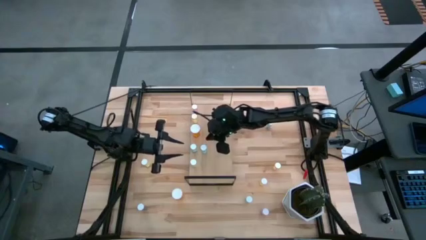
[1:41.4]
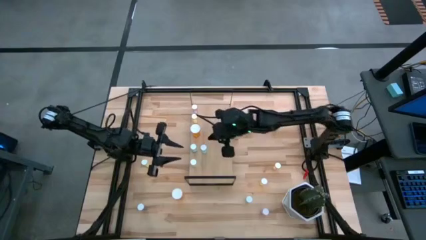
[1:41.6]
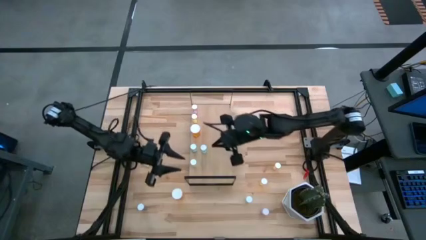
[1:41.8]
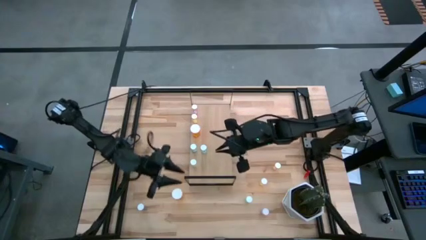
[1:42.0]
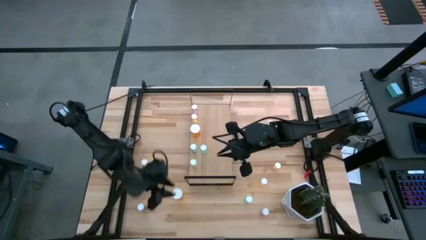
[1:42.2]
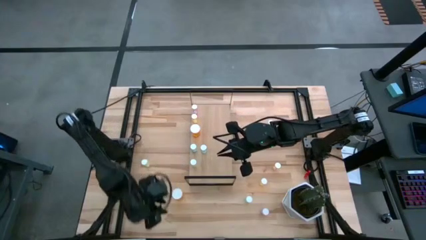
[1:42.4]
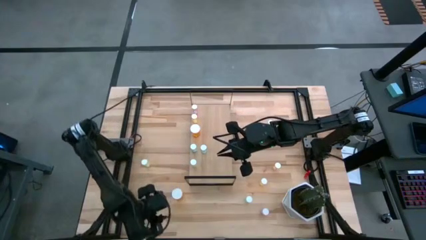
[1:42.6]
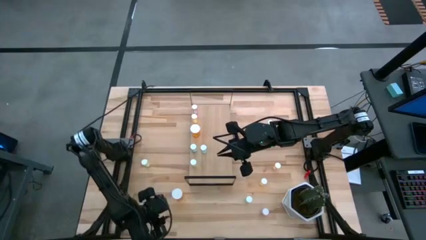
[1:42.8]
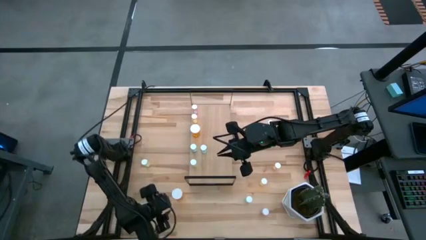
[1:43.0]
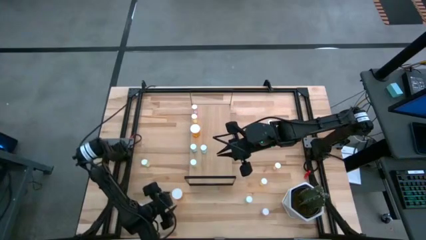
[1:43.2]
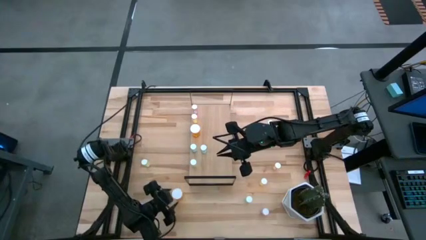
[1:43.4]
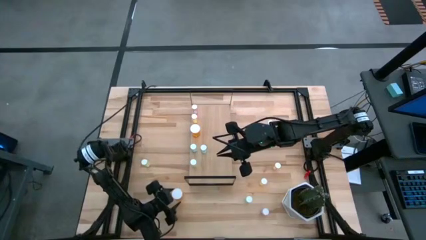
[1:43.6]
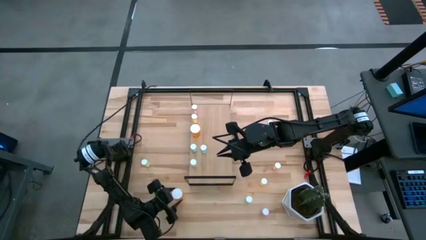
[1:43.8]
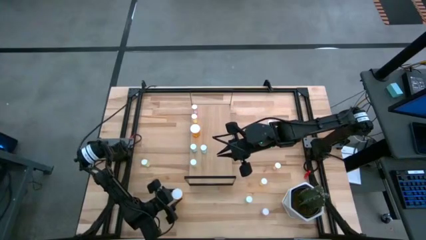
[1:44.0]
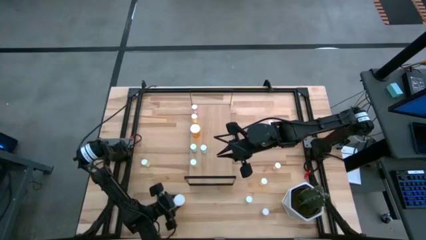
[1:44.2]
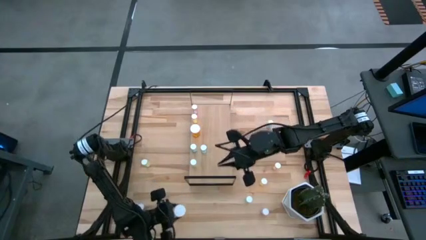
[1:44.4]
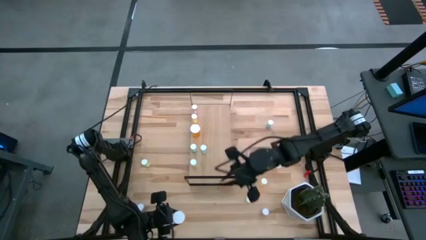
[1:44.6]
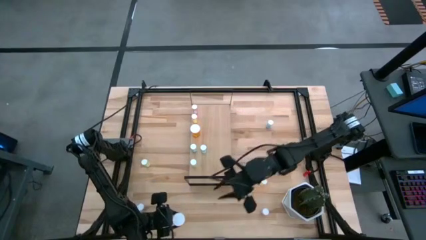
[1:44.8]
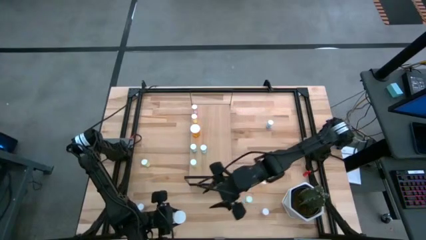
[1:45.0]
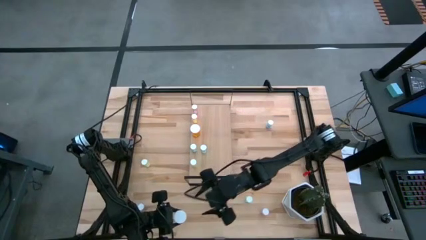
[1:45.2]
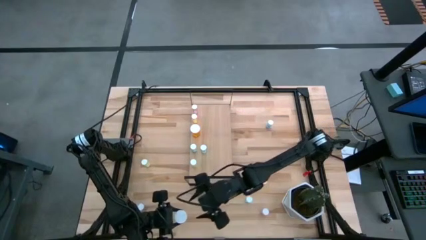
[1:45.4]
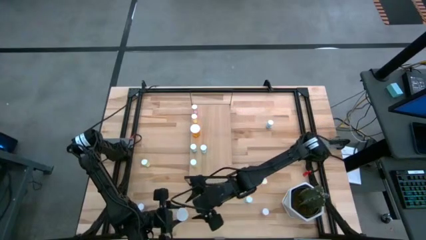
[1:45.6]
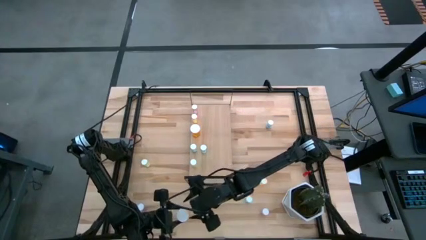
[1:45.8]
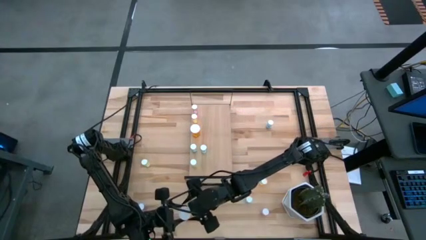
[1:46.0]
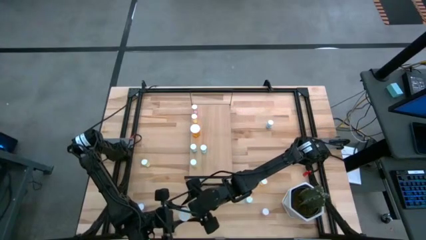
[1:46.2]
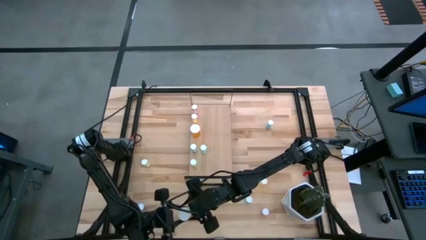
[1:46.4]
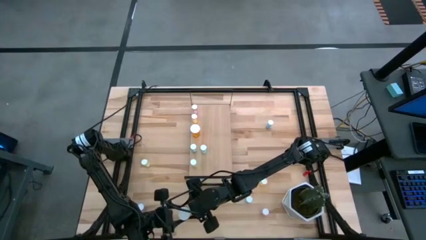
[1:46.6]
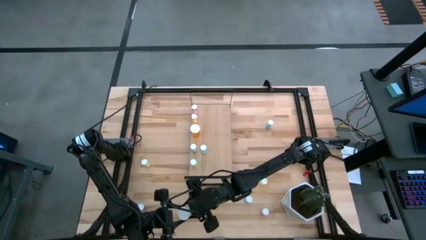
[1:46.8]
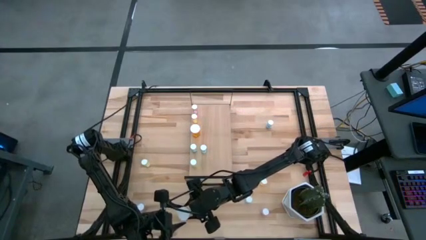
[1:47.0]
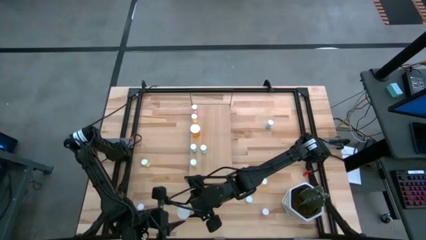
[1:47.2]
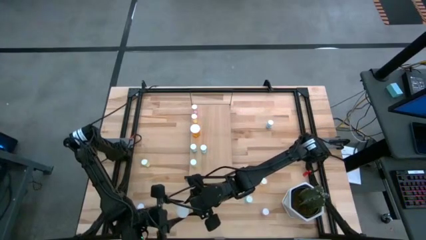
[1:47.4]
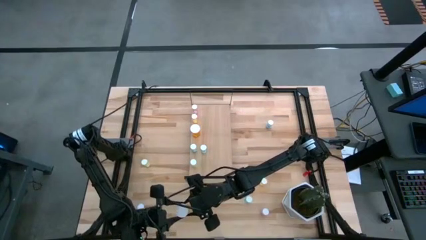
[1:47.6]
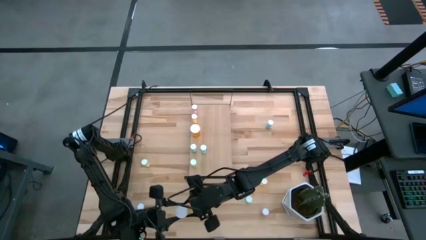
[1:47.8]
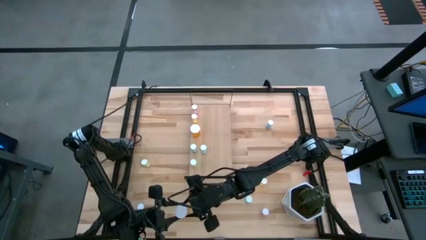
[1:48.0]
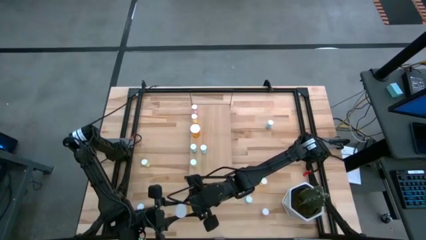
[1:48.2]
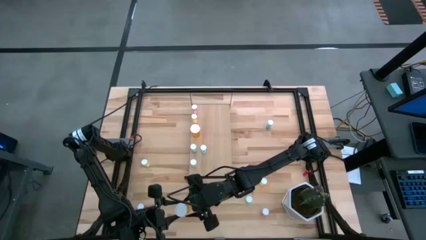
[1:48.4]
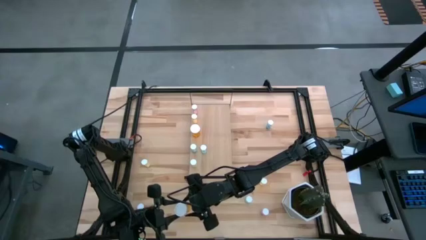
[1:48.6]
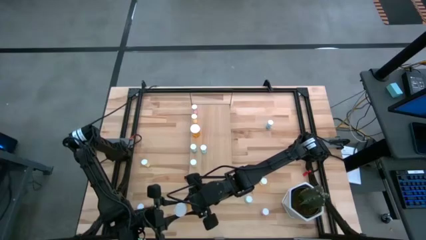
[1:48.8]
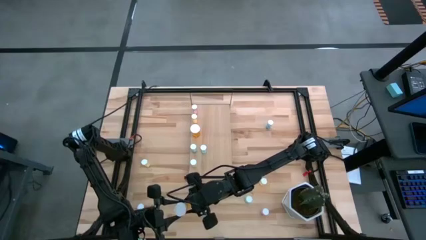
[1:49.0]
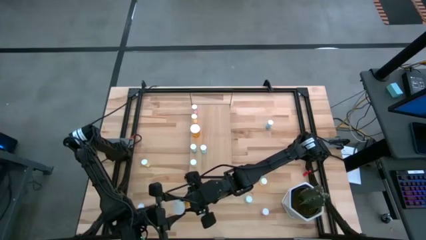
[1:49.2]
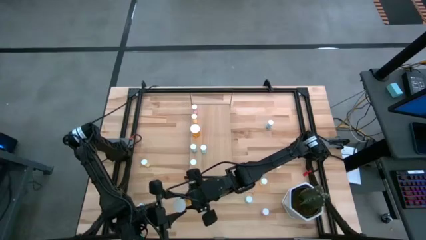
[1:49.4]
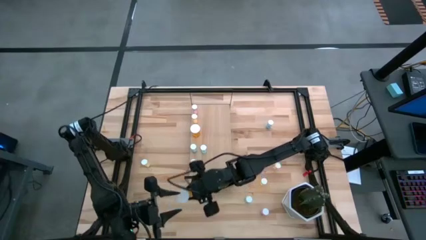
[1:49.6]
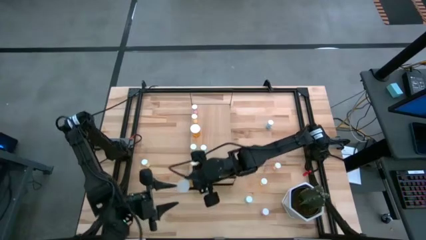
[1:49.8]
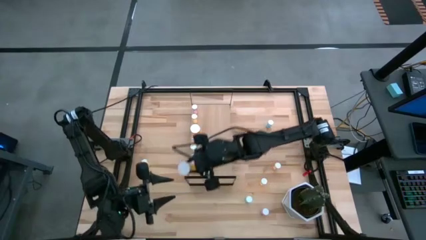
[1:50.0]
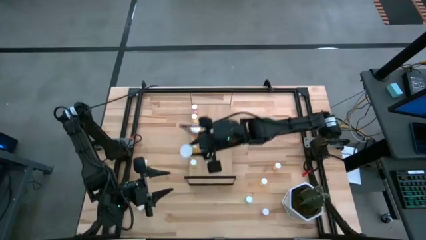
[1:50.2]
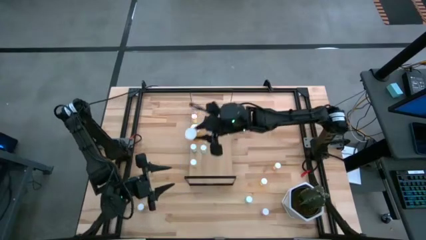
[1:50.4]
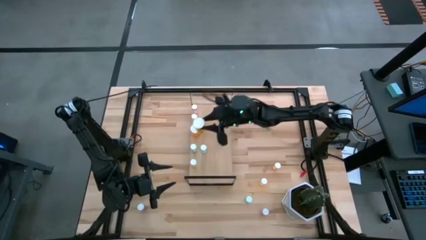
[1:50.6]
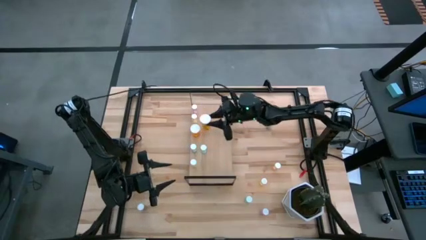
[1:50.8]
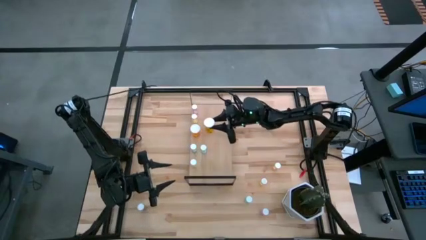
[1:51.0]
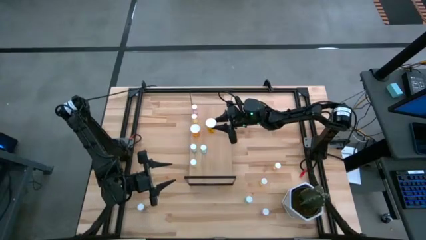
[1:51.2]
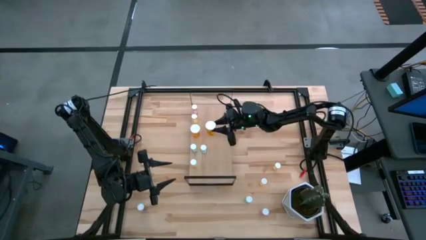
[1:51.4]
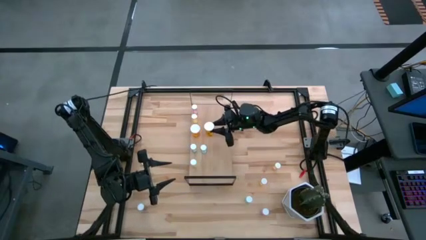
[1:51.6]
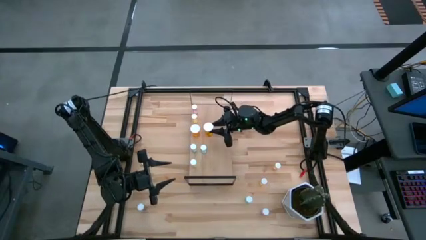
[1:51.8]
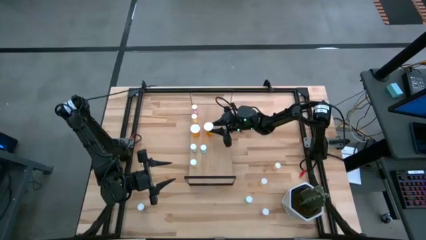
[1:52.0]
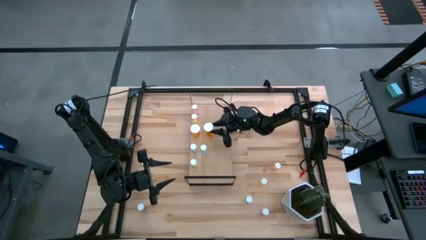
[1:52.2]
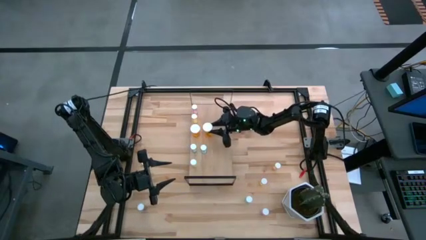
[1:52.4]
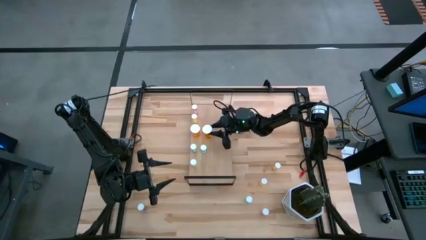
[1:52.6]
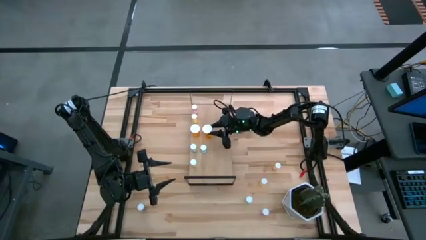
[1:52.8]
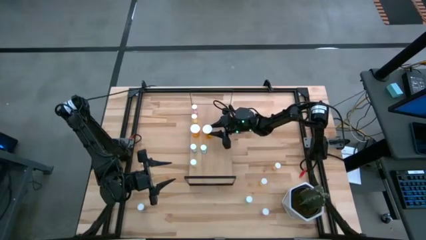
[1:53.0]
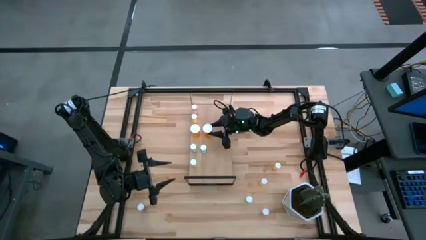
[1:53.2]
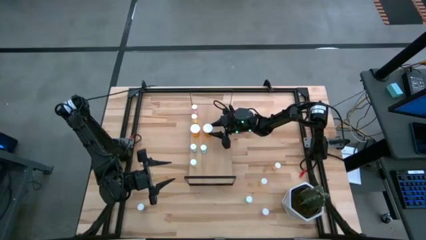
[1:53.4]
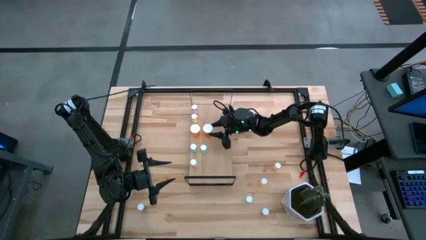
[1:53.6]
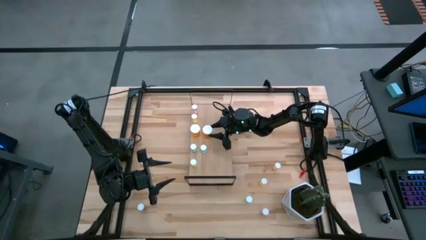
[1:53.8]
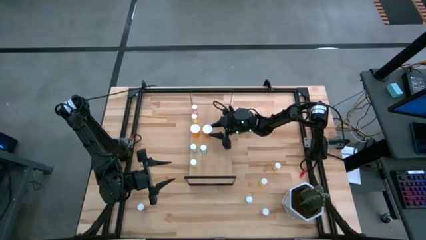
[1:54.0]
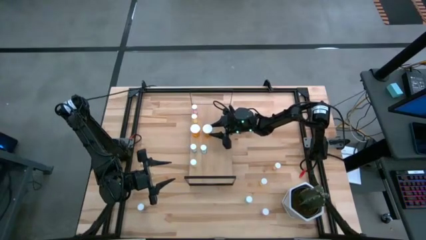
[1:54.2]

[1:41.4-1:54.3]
Task: Pick and place medicine bottles onto shelf by color
Put the big orange pill bottle on the shelf aligned with the other orange pill bottles

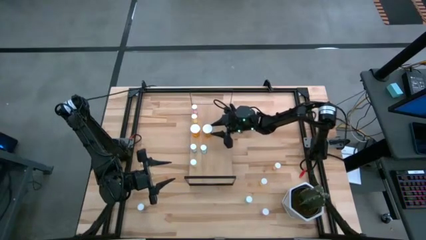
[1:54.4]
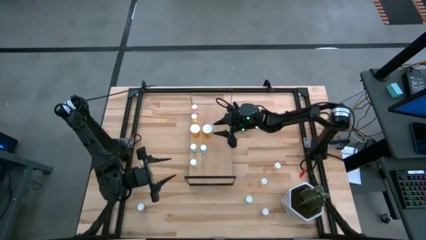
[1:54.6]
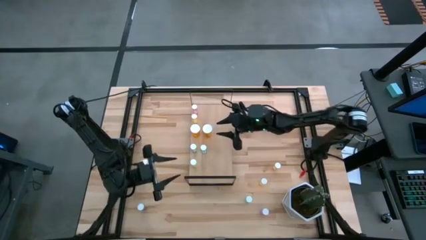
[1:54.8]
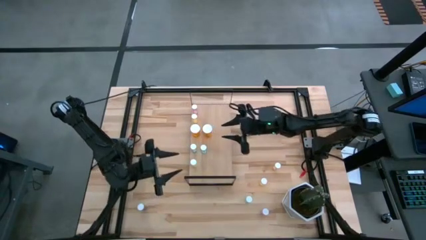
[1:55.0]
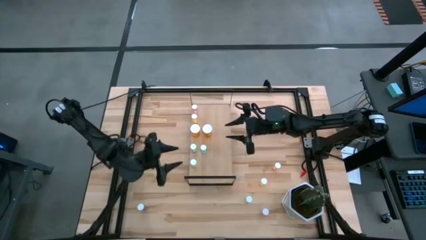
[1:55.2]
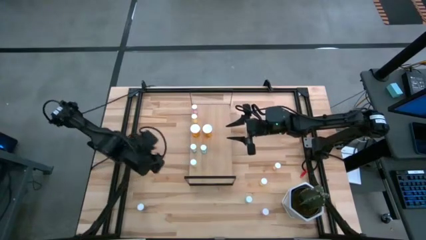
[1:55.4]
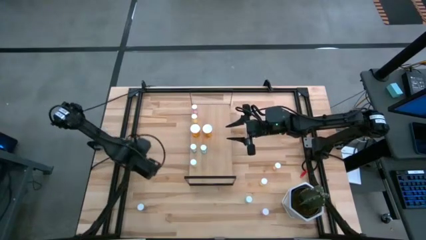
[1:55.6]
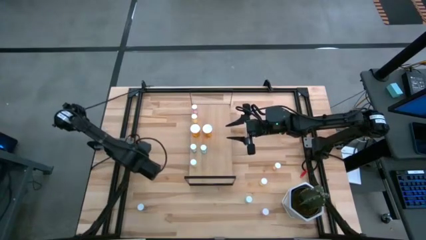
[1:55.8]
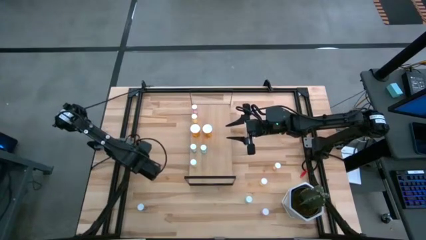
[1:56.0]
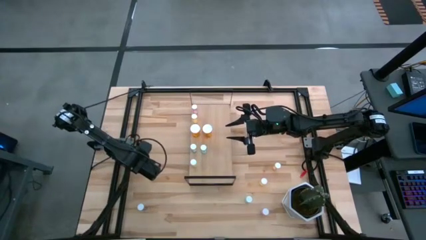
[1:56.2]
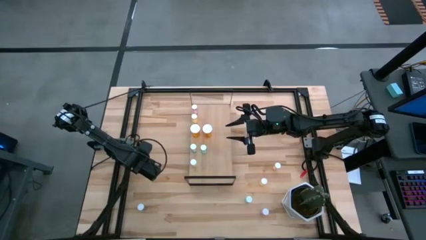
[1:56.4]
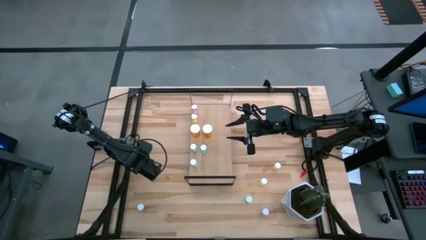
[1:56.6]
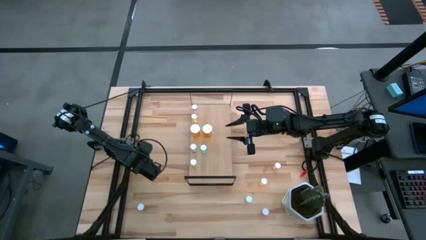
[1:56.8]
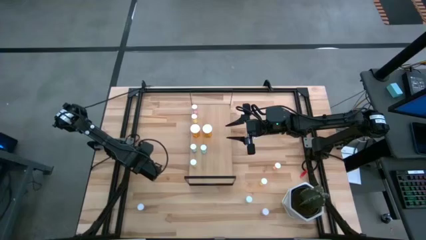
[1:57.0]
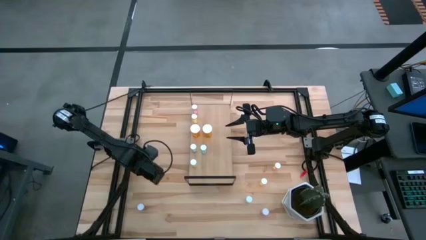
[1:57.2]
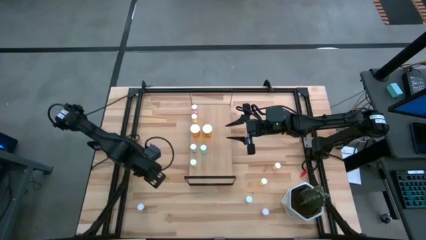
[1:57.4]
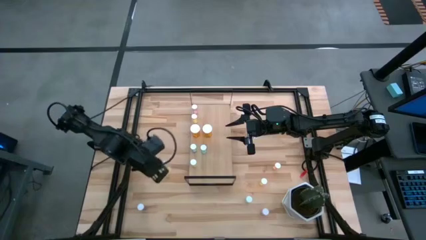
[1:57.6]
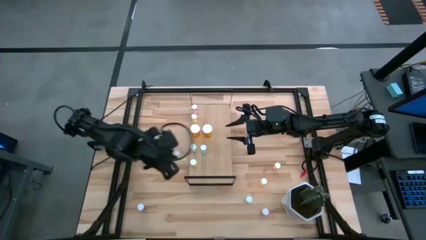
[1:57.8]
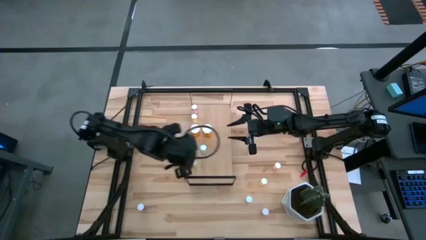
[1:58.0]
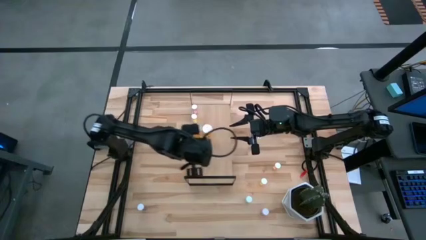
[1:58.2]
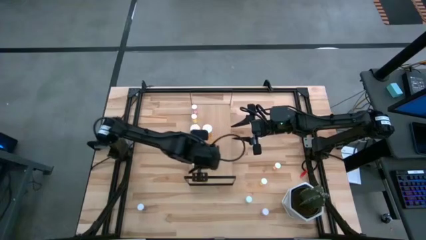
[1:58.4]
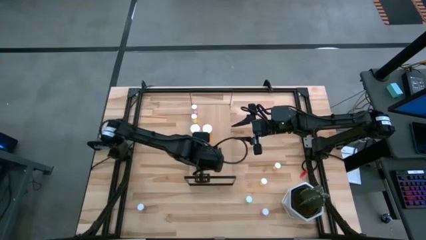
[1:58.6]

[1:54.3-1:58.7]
Put the yellow pill bottle aligned with the other yellow pill bottle on the shelf
